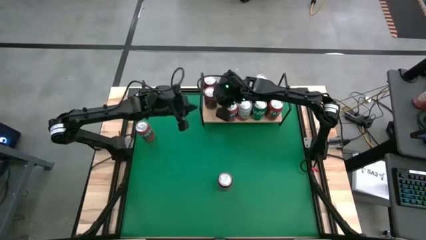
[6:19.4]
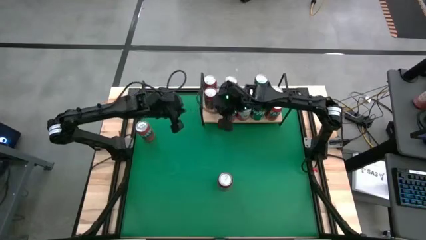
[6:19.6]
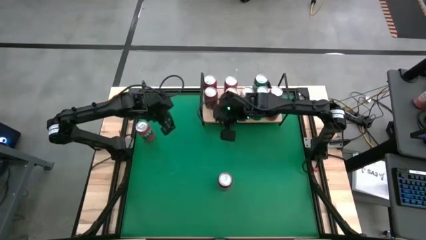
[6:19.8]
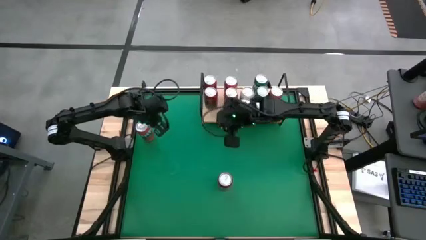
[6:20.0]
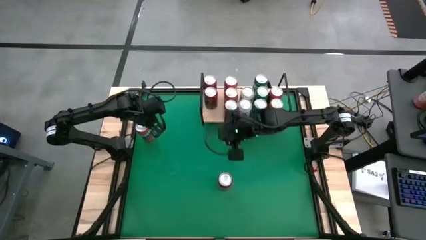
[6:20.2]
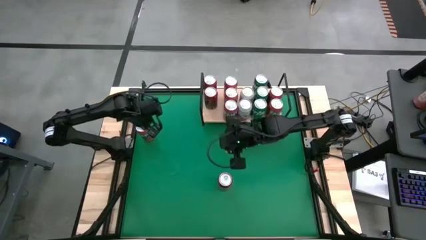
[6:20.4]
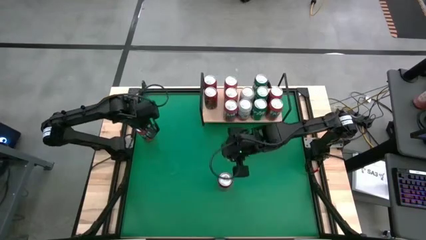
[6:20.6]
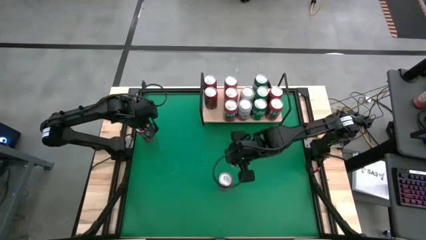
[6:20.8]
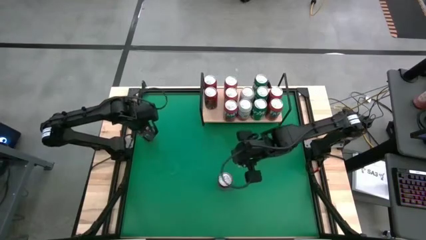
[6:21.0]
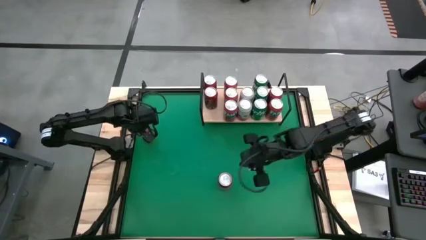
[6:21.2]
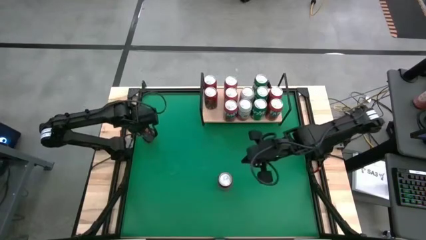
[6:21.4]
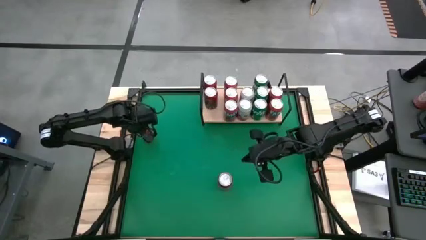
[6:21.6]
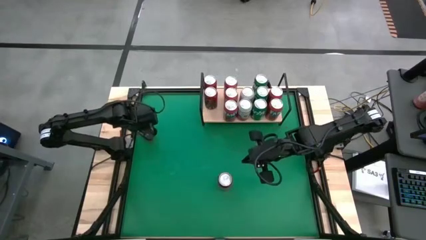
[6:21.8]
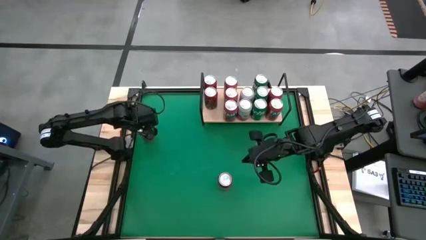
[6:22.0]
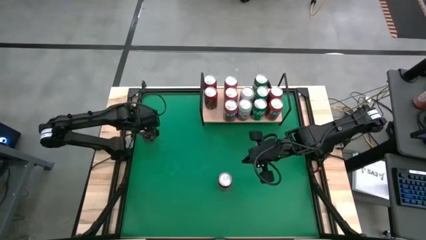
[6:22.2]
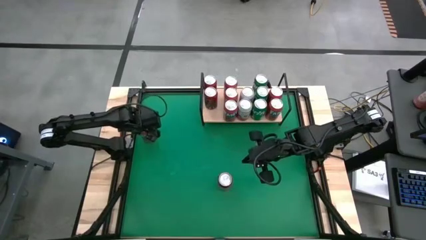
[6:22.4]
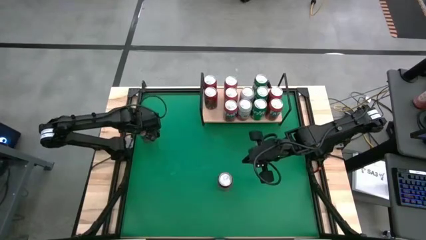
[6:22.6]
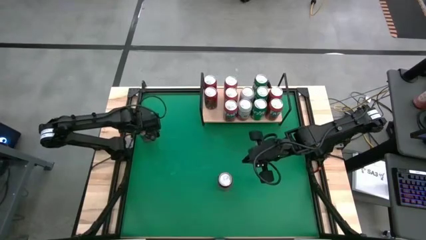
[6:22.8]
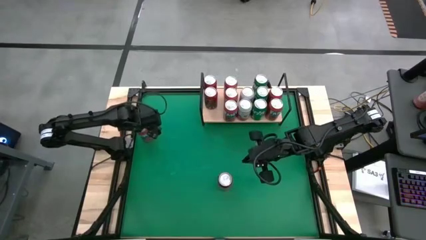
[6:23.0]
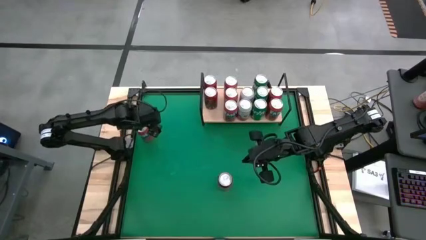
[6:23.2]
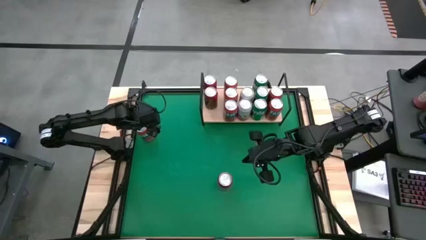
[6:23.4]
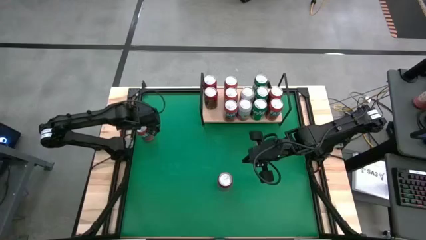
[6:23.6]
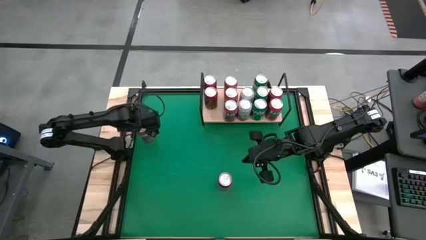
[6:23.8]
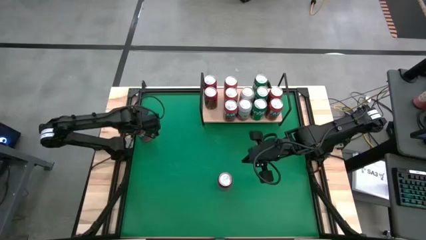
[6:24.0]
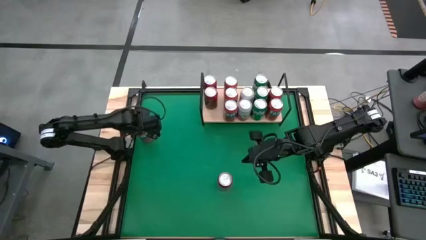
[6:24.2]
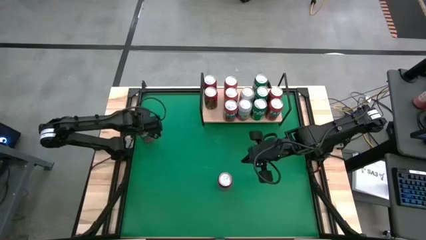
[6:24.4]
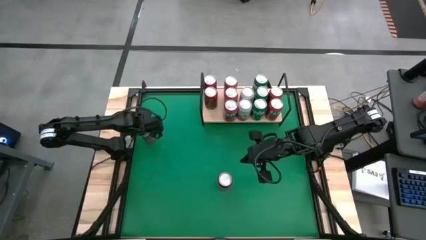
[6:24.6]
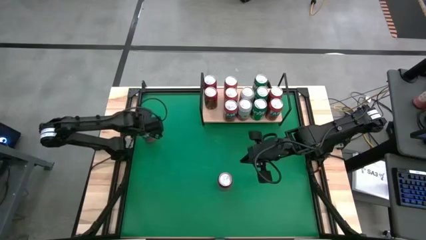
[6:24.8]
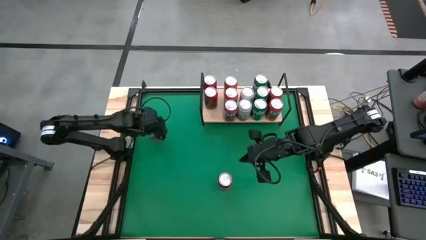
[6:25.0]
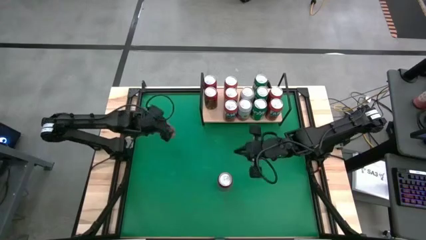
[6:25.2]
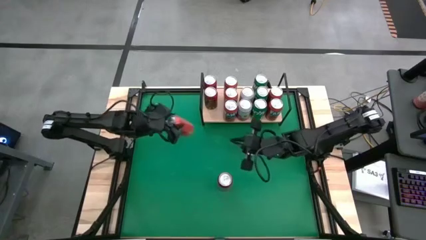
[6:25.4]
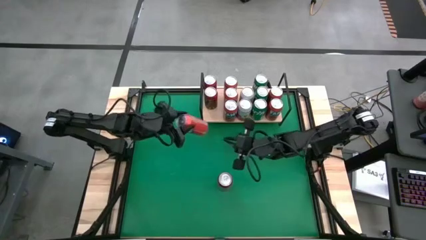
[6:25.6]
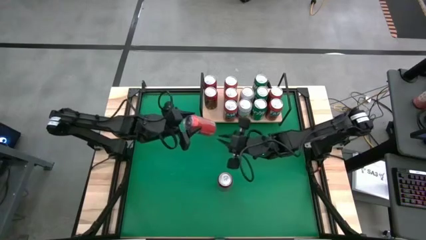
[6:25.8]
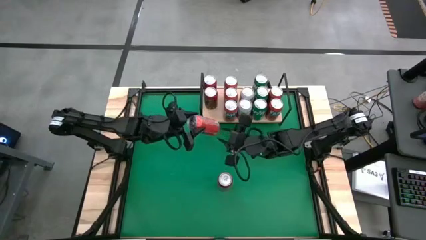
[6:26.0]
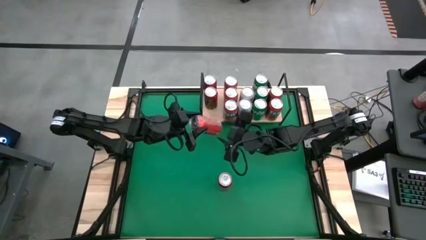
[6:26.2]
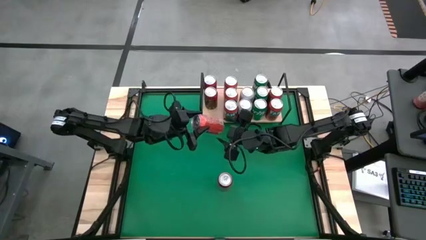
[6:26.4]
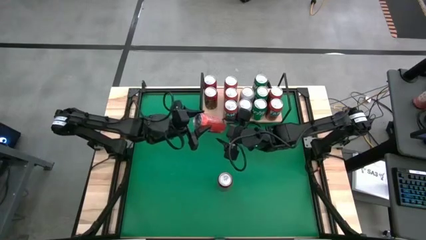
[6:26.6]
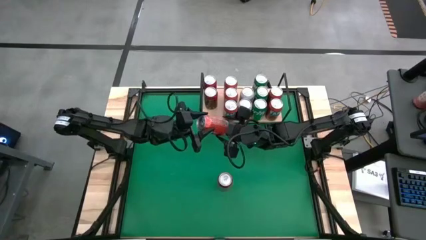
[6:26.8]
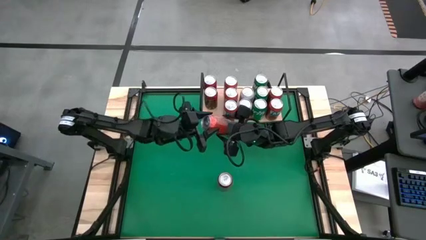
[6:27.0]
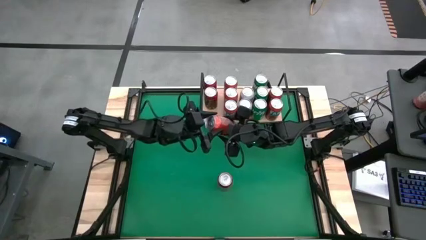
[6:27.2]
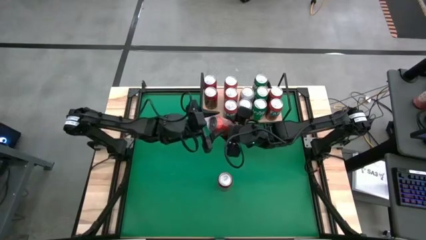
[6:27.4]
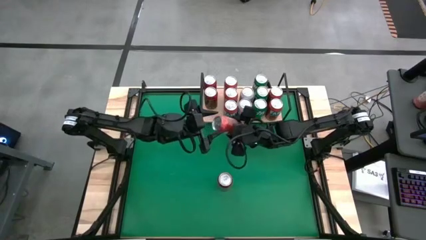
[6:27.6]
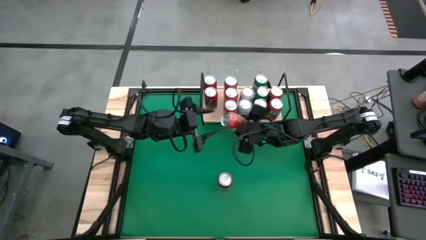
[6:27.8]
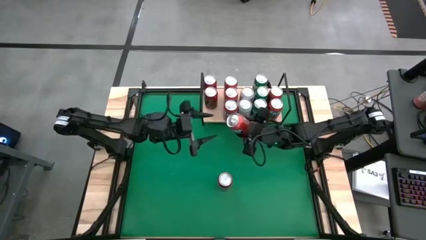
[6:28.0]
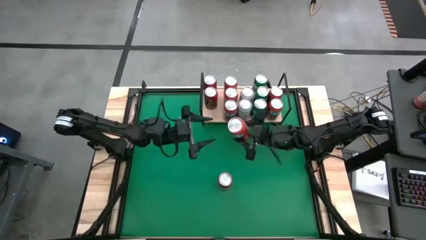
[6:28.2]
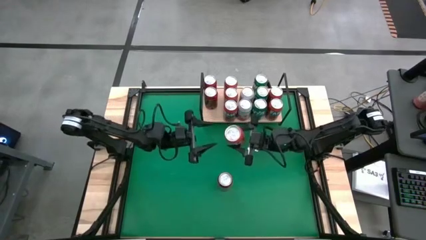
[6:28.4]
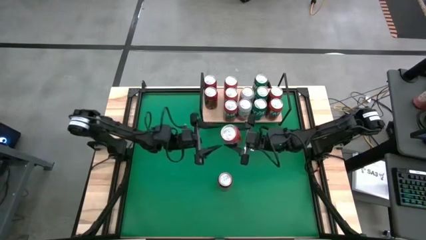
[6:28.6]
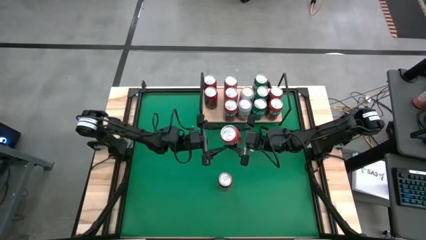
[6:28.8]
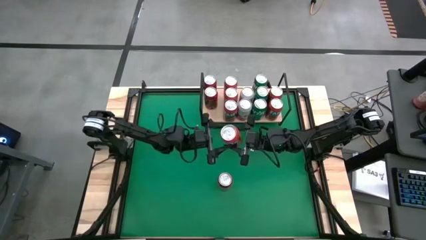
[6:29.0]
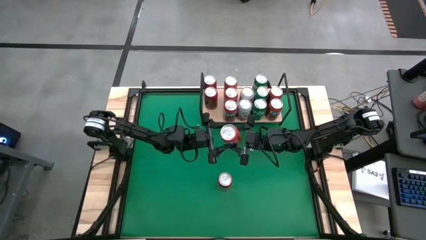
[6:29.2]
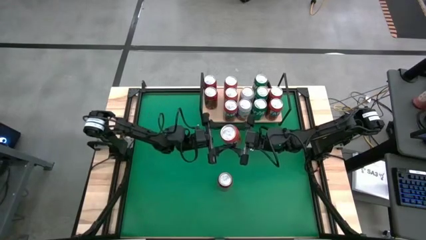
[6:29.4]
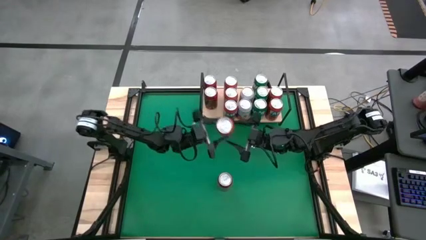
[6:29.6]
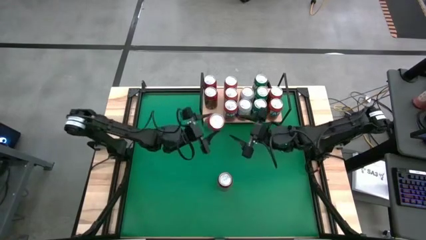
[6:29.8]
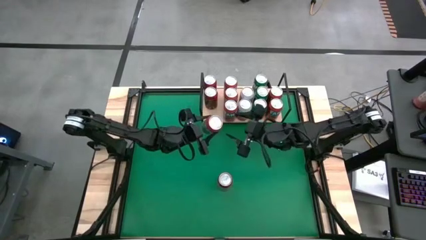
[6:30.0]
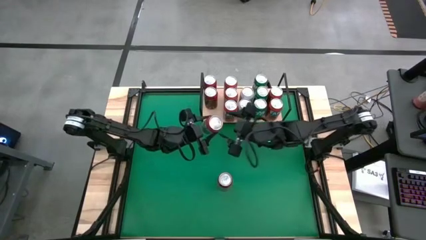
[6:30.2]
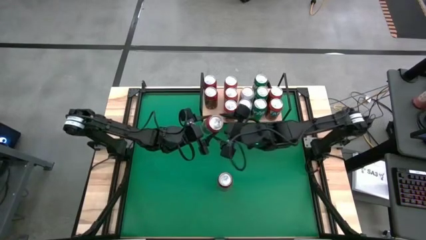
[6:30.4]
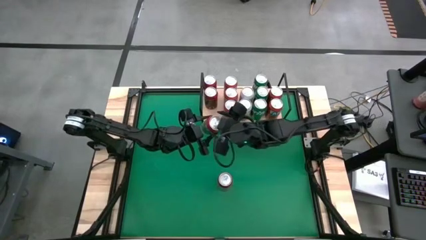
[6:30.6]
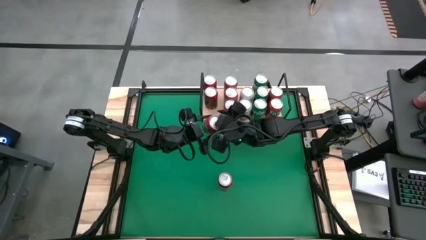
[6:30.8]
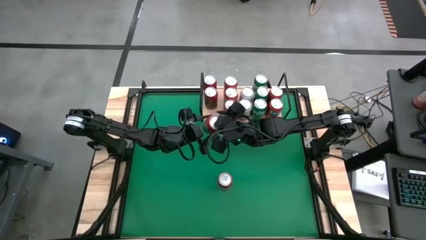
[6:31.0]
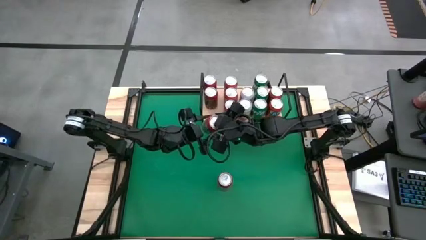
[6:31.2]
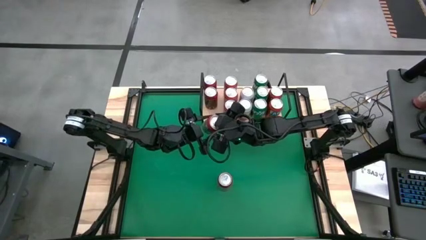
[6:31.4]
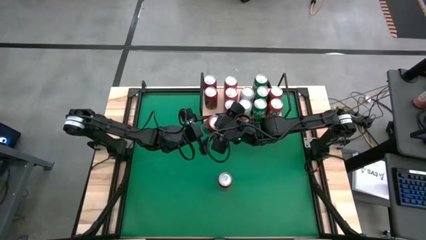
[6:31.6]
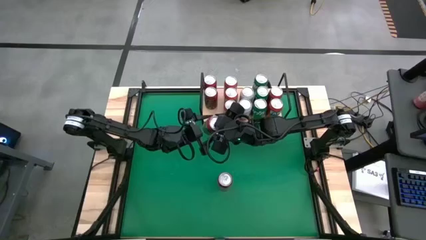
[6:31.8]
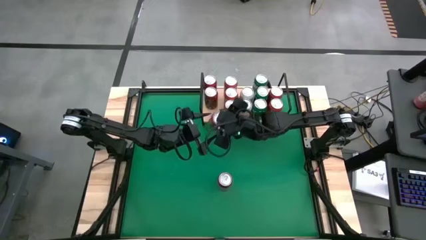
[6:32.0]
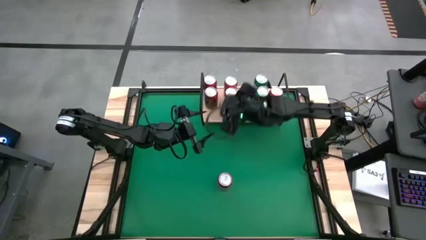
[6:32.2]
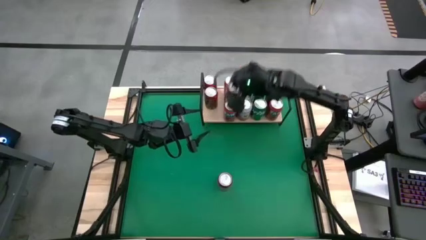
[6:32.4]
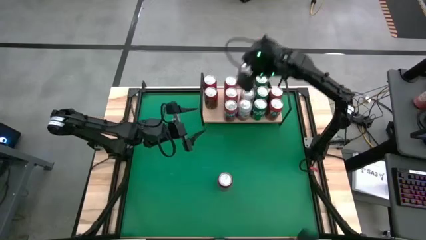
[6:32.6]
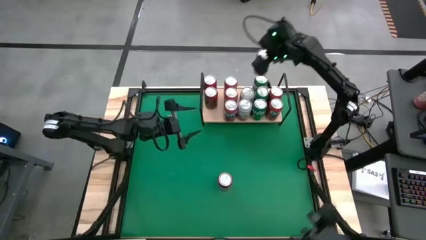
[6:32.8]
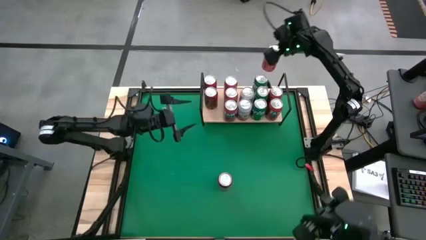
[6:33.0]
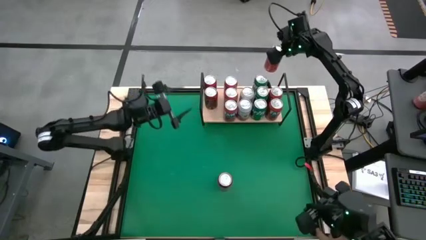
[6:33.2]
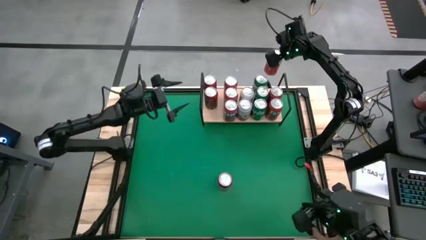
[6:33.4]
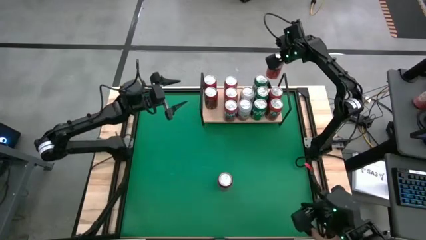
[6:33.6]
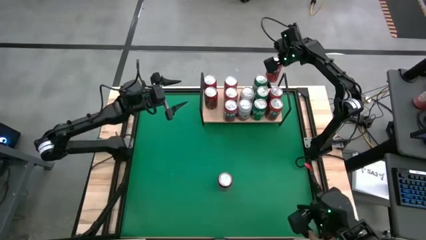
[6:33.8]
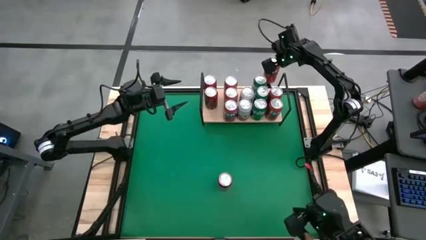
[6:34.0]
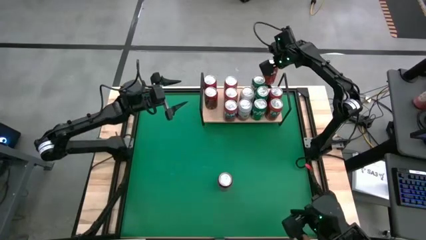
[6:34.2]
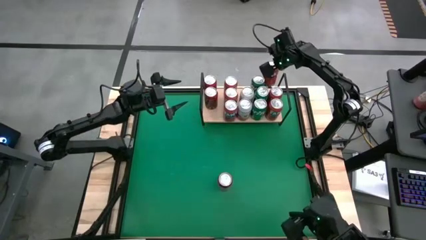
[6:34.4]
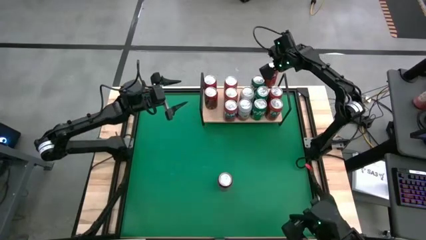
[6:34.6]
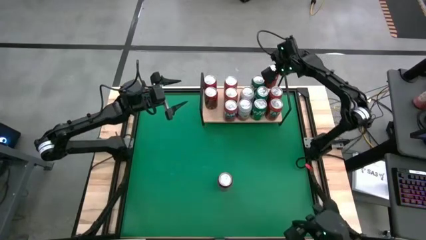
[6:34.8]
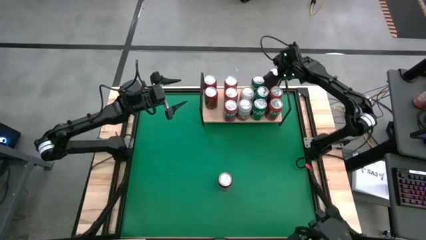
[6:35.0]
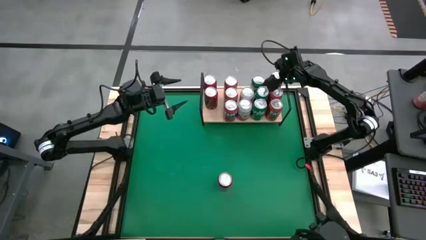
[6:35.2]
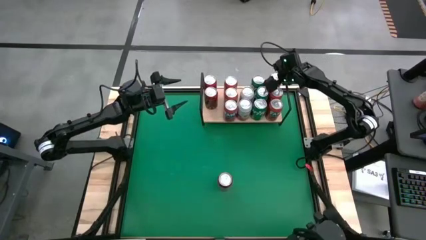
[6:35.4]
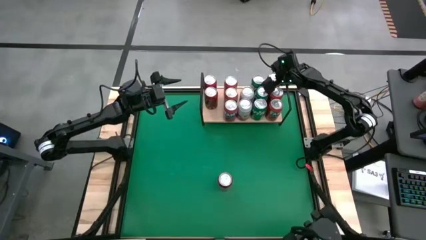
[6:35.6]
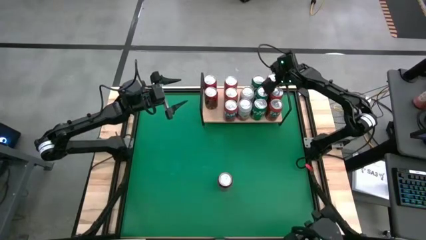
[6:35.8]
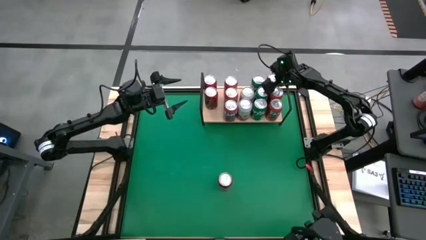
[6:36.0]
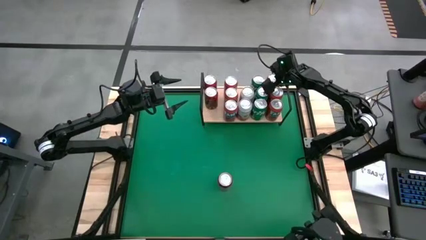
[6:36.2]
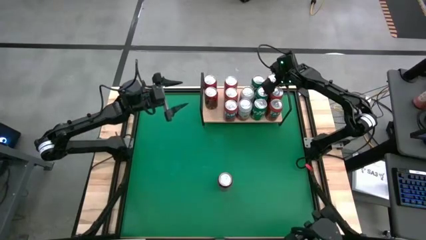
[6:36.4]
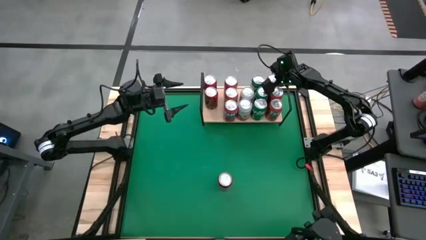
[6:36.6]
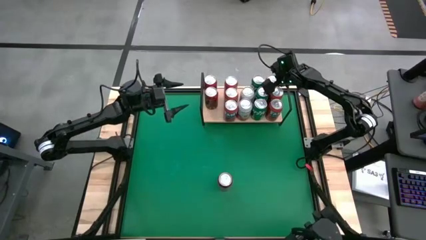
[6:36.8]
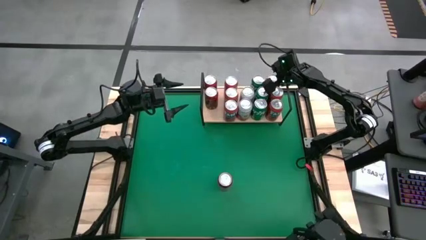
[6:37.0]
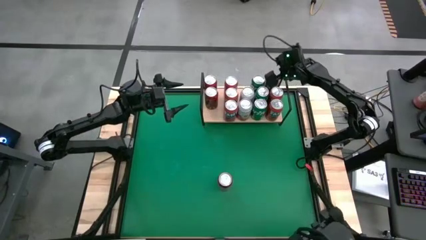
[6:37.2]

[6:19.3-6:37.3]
Task: Place canned beverage on shelf
Put the red soda can on the shelf aligned with the other red soda can
